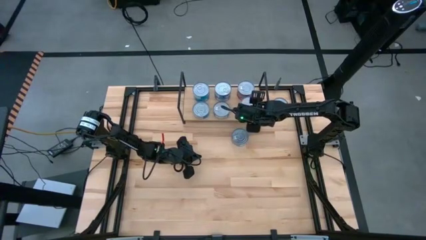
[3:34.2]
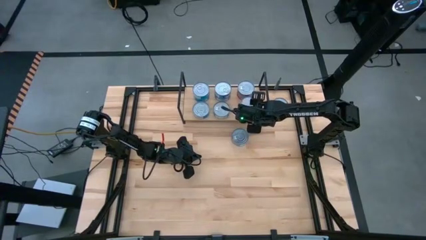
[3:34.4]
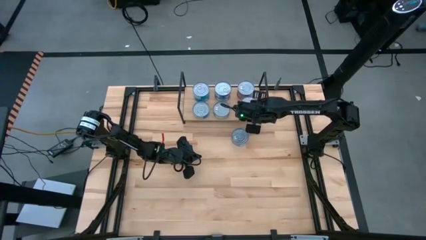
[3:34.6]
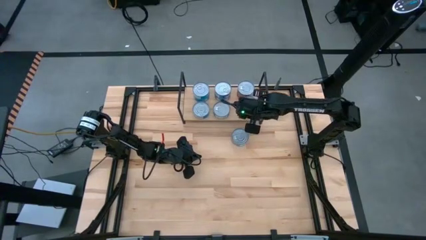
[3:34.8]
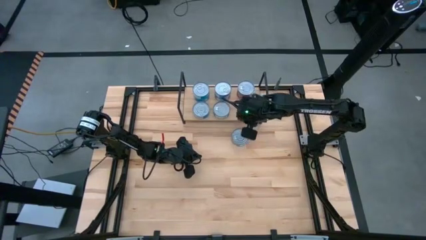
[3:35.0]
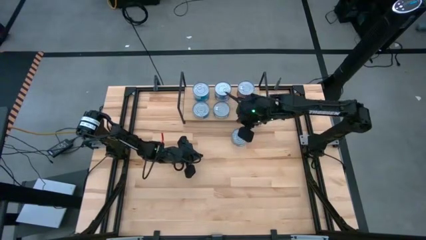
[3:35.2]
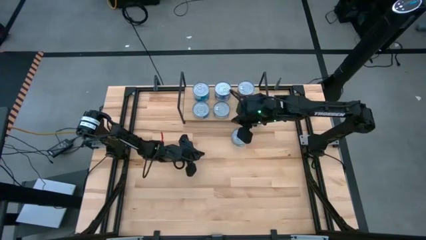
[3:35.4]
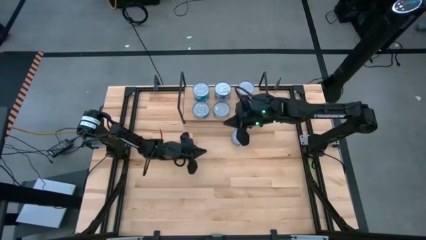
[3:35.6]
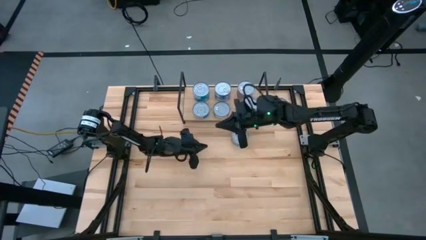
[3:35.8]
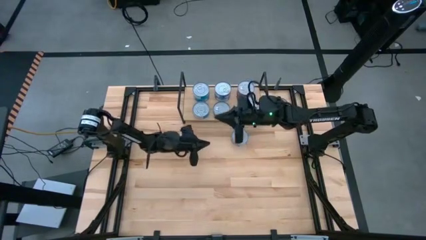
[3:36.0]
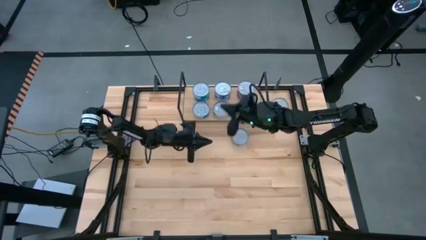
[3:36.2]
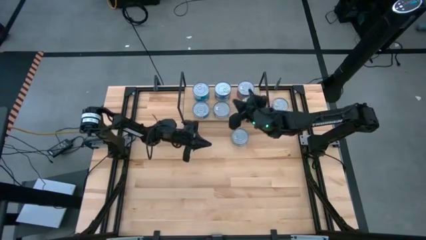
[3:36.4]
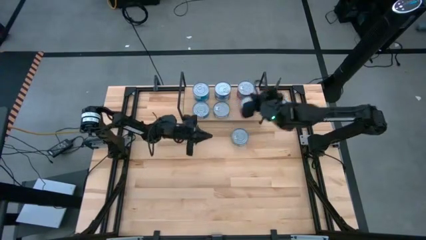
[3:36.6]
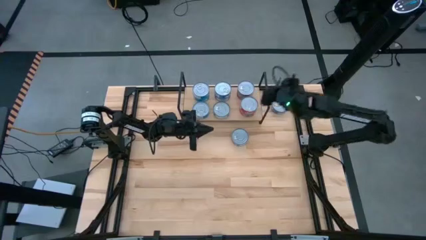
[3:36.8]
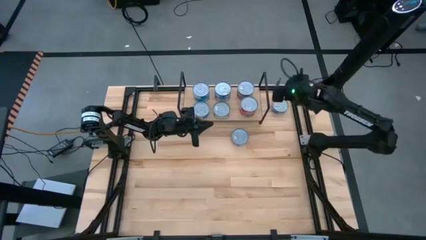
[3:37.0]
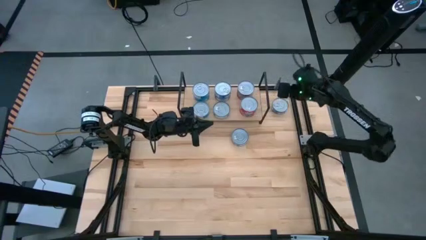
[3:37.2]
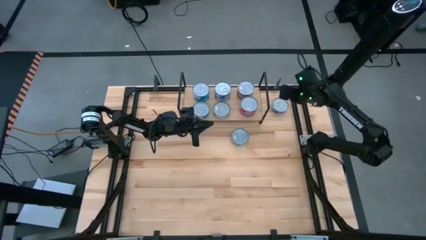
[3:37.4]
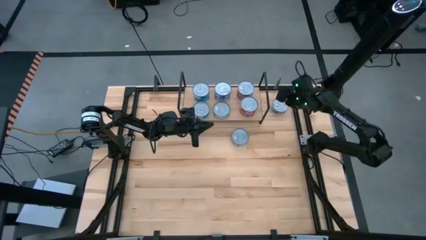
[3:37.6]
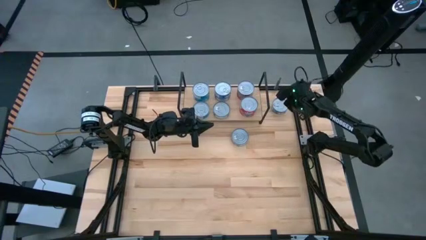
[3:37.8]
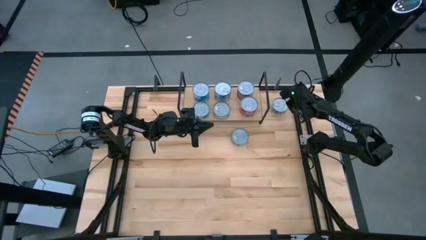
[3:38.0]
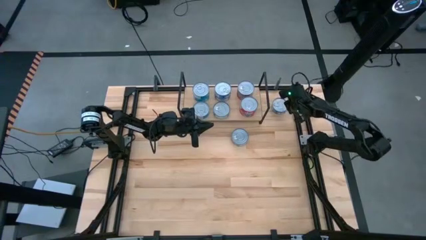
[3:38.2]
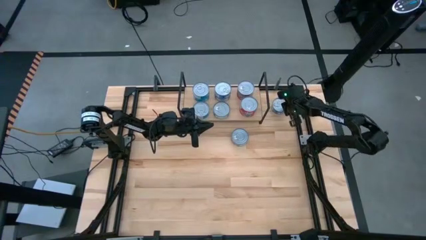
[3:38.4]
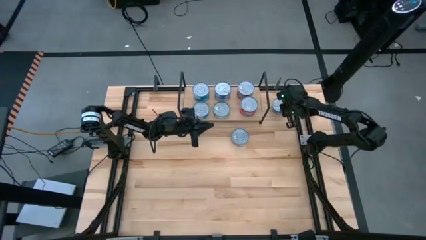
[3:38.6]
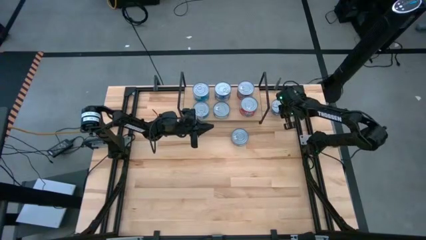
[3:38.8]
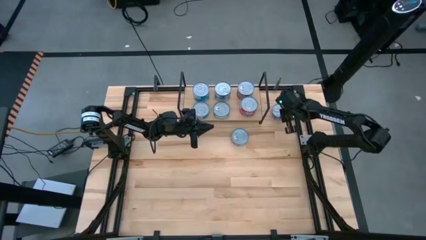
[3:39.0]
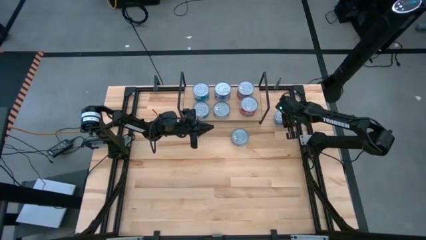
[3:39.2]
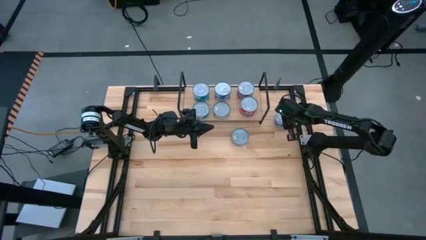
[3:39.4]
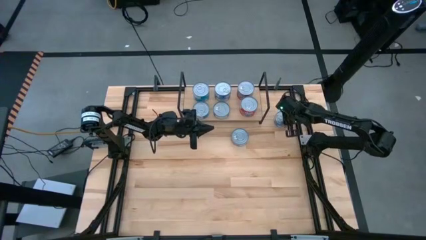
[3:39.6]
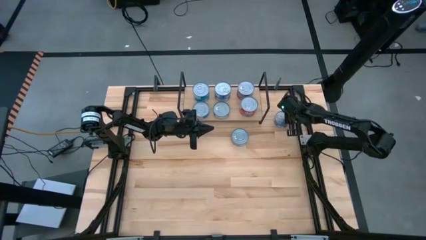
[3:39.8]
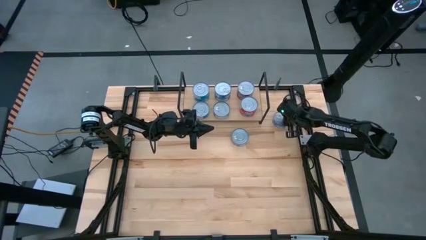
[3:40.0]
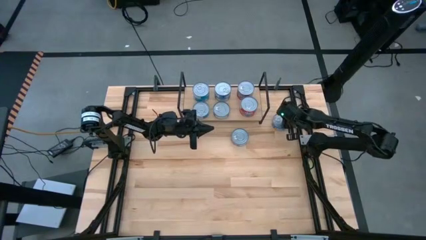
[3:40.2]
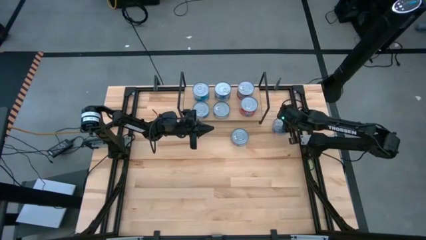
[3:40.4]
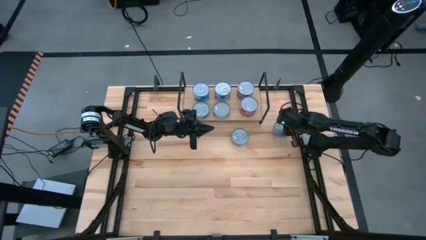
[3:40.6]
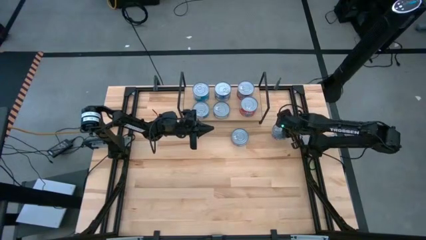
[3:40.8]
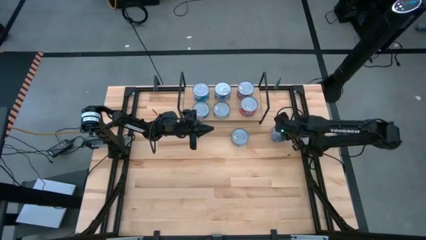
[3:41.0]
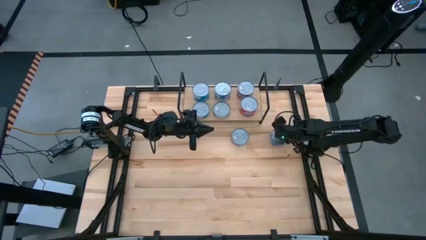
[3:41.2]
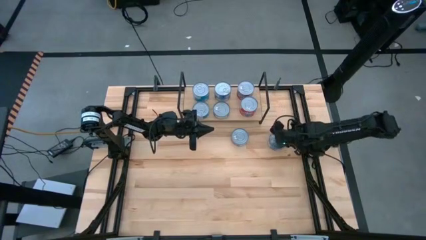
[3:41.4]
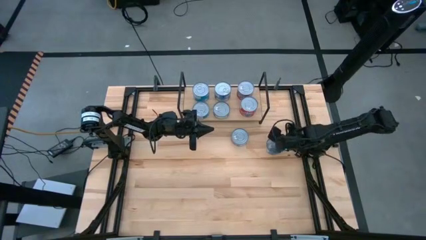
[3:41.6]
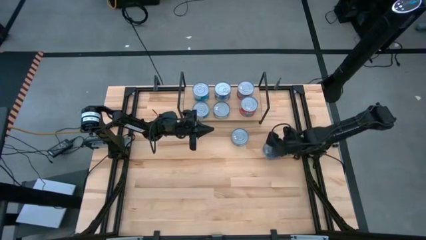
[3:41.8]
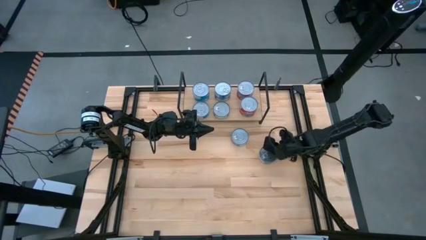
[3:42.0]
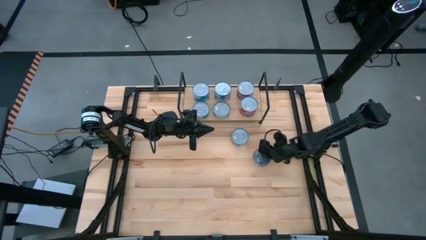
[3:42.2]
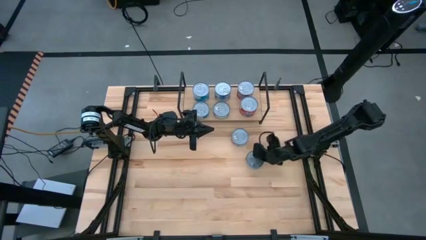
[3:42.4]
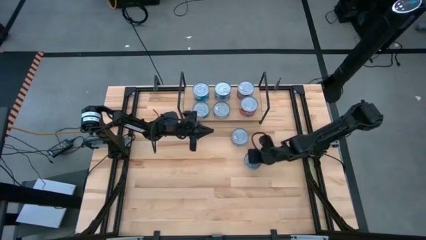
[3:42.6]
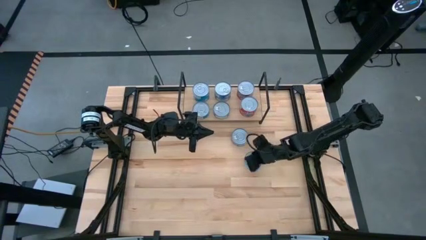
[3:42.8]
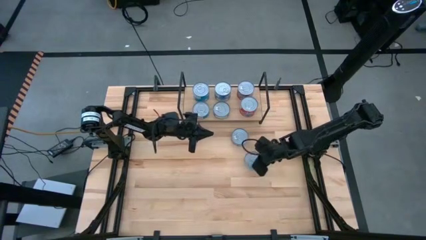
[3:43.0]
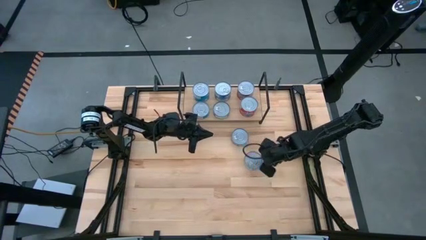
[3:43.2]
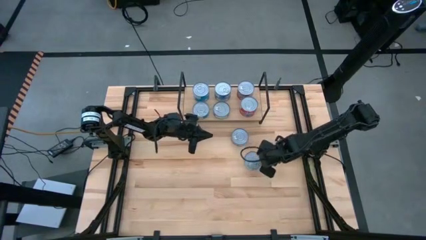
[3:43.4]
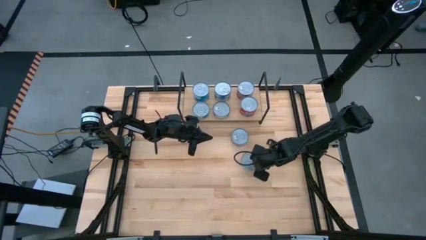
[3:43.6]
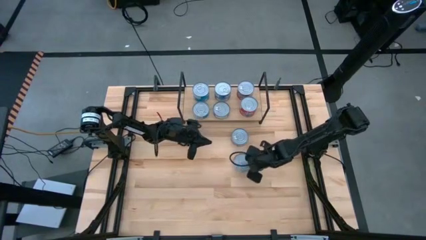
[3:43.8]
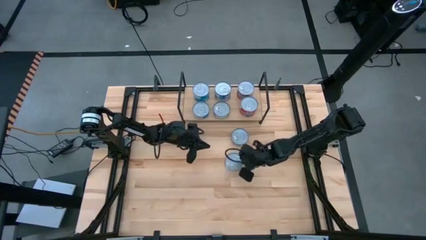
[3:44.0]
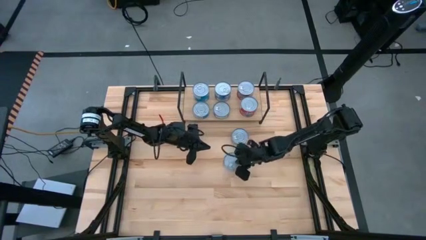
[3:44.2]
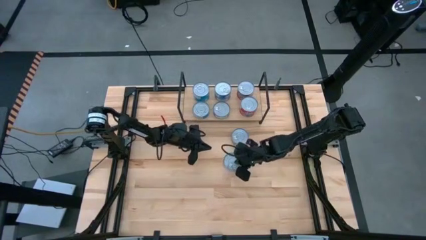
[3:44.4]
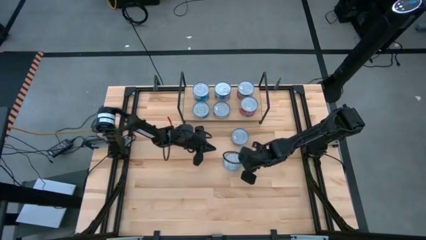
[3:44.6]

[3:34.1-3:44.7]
Task: Stack canned seafood by type on shelf
Stack the blue tuna can on top of the blue tuna can on the shelf

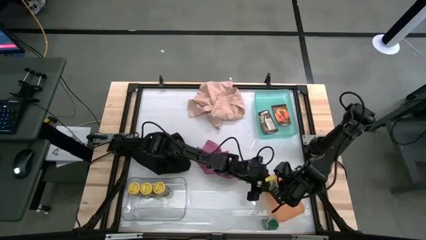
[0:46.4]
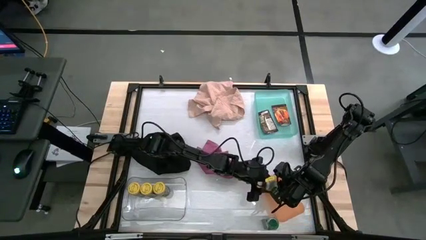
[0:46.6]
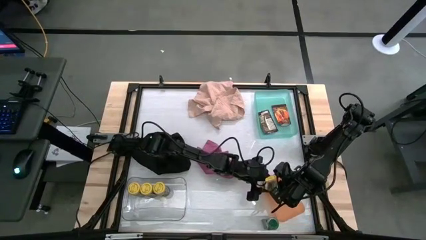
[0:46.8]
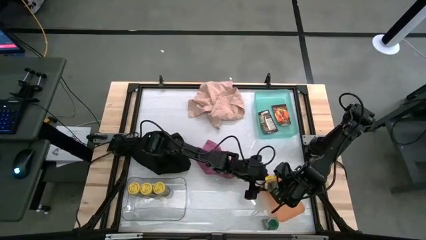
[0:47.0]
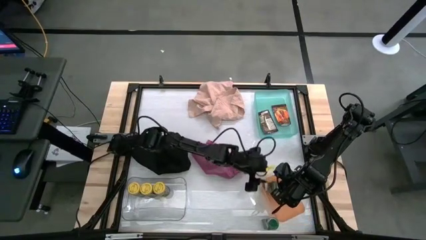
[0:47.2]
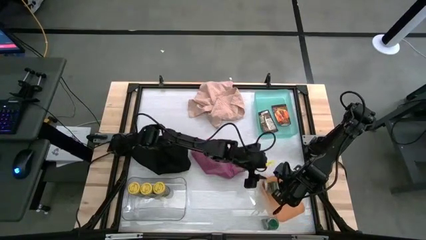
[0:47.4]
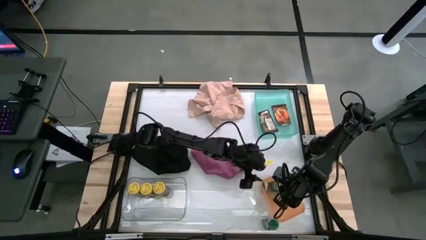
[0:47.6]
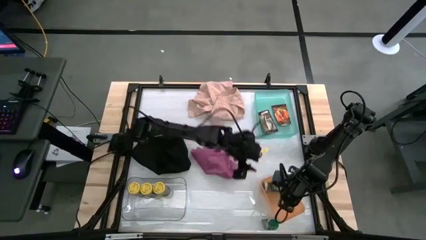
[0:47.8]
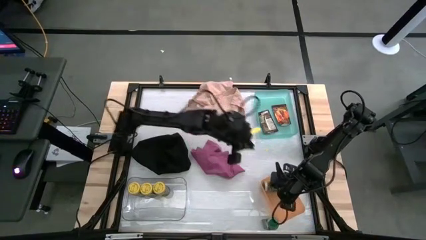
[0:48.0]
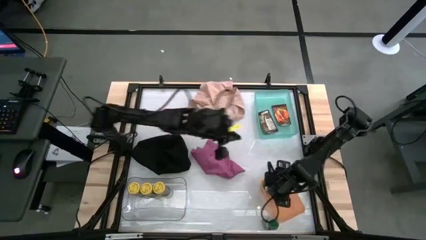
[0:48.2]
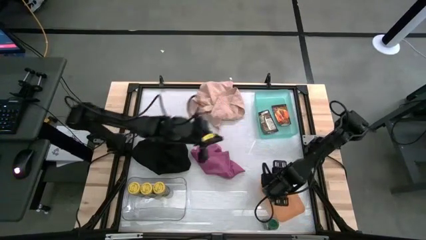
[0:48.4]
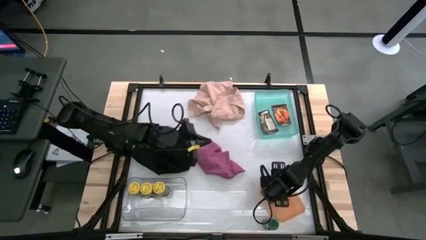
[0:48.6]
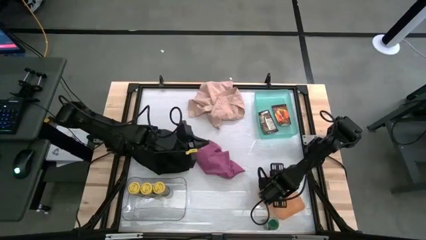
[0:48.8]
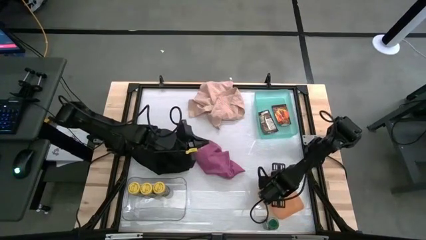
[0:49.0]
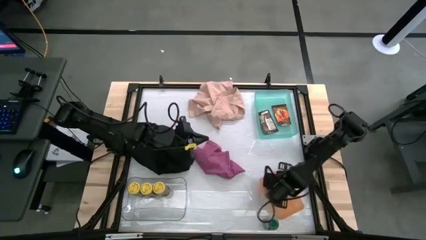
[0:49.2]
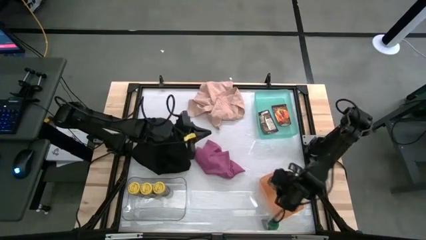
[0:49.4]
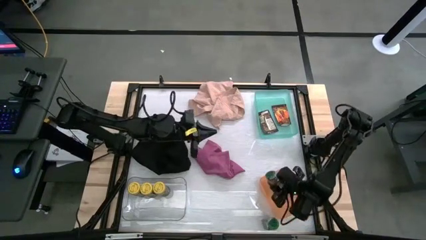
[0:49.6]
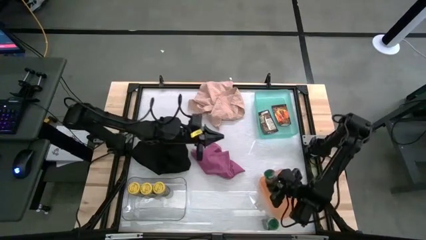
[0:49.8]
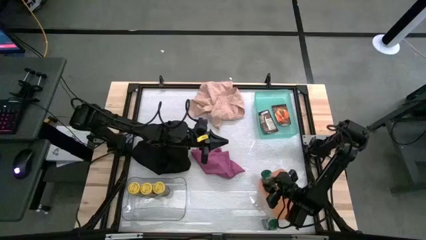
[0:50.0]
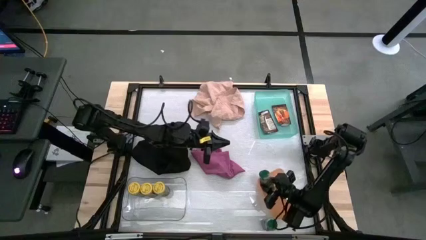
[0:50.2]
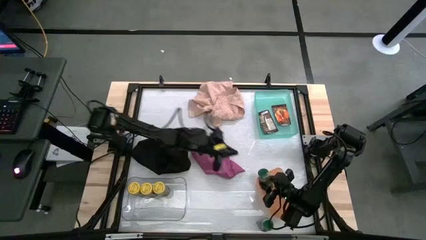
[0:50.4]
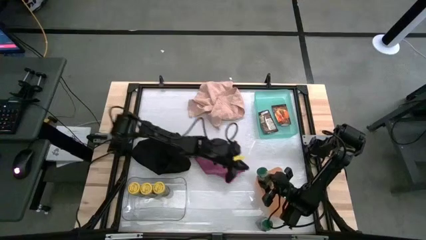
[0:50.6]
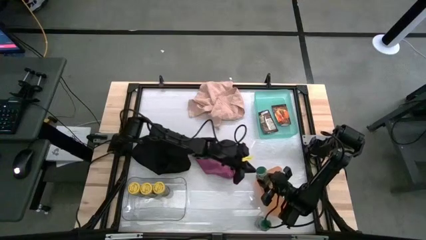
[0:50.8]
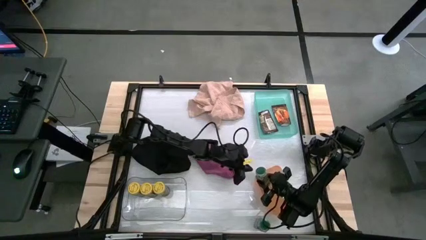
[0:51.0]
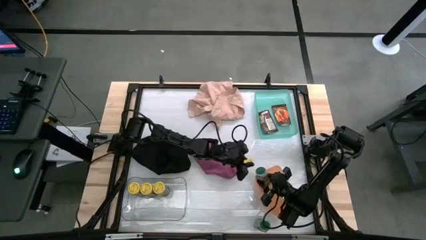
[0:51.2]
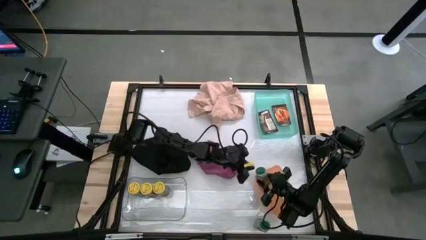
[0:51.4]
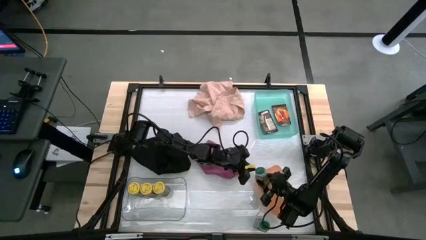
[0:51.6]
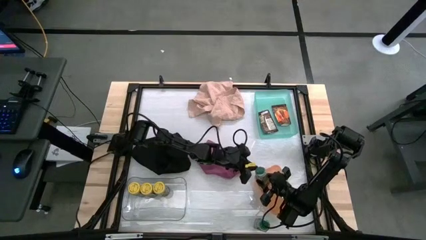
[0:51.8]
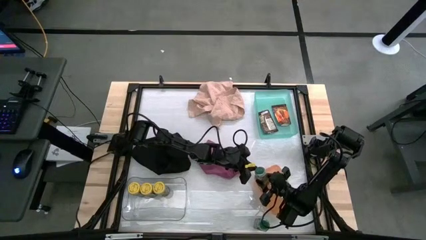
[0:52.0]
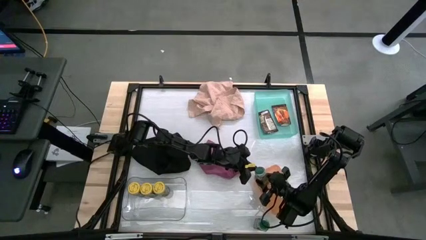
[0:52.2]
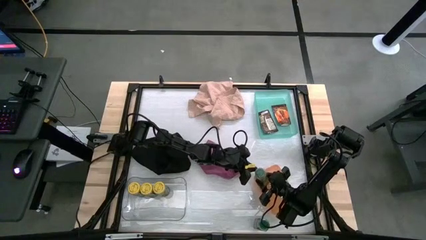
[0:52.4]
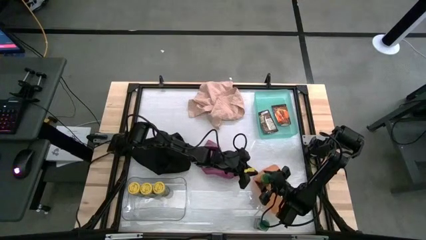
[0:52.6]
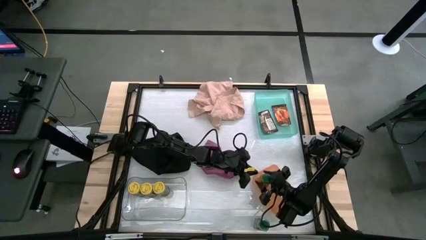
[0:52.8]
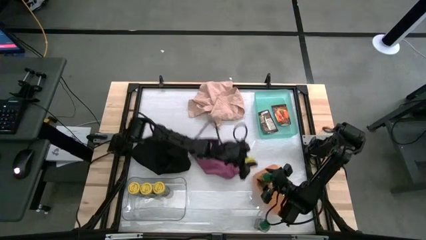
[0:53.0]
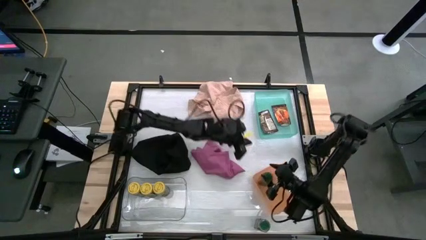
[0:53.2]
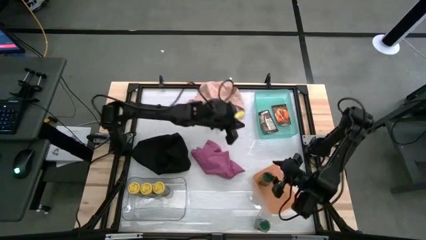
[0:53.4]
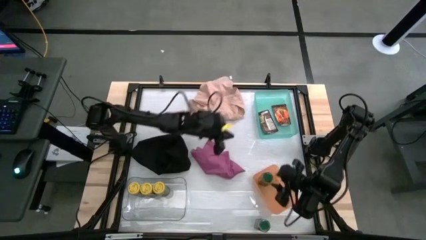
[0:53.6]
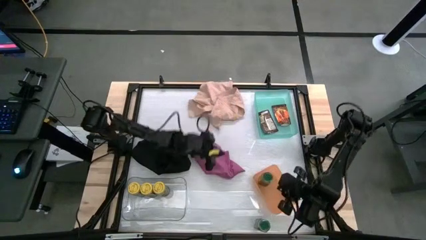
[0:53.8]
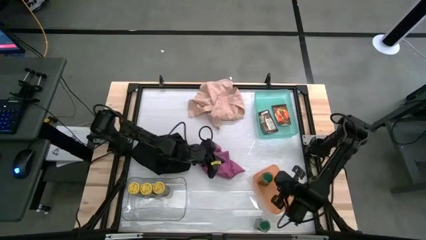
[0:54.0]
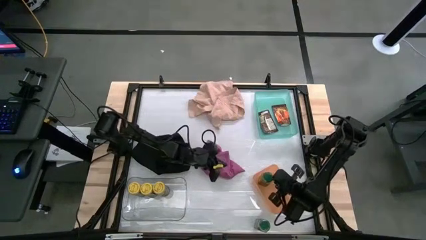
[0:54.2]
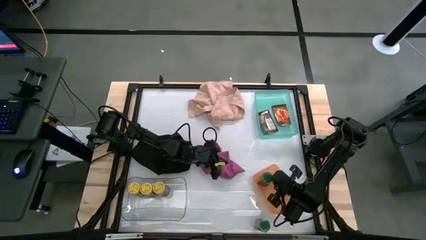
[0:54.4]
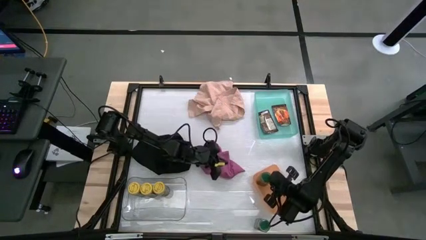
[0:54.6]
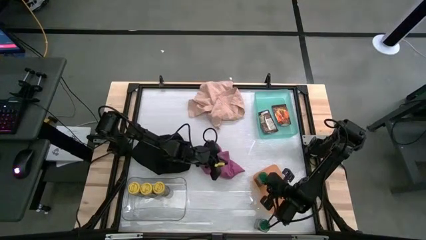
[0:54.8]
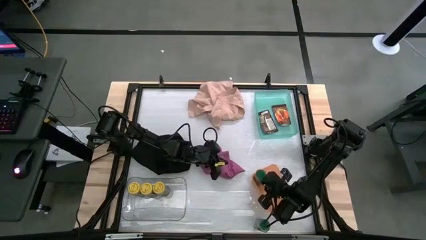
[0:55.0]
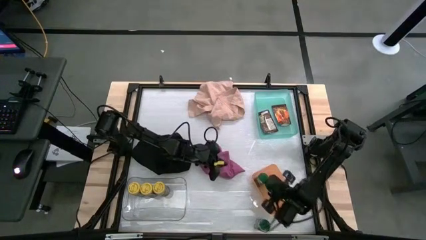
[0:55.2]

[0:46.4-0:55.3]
Task: Sort spices by type
Put the top green seasoning bottle into the orange bin
